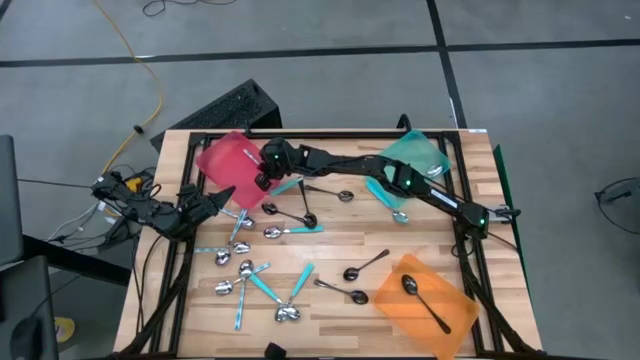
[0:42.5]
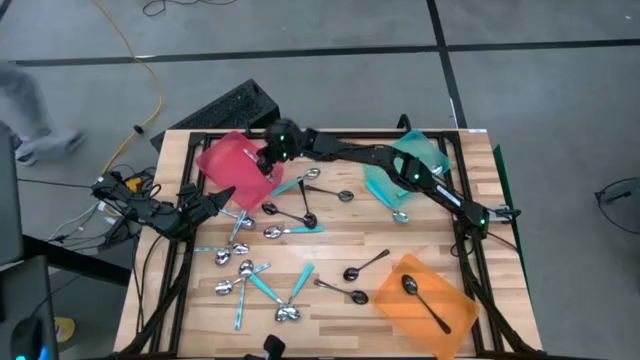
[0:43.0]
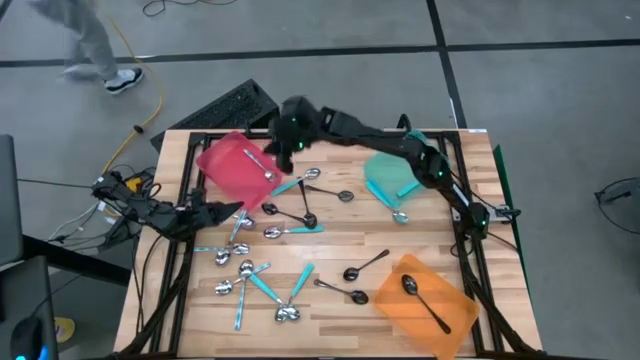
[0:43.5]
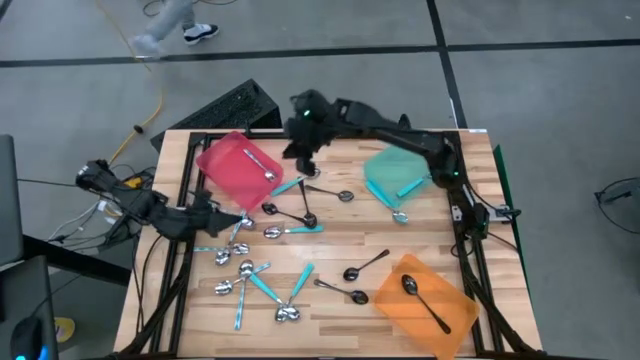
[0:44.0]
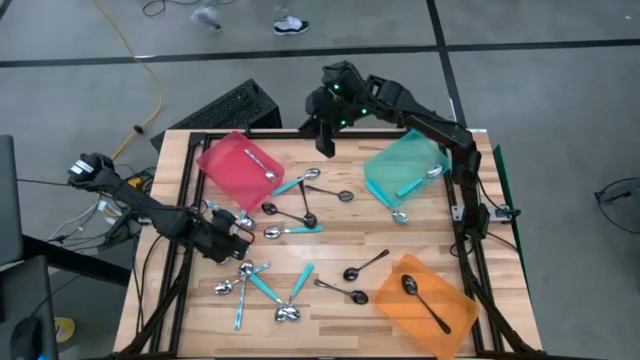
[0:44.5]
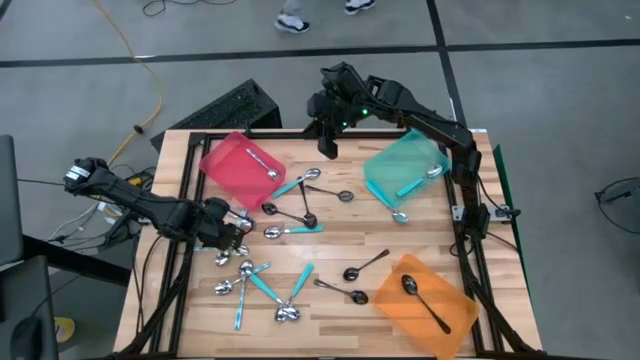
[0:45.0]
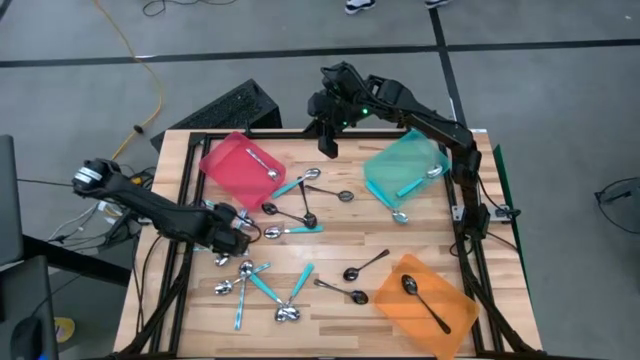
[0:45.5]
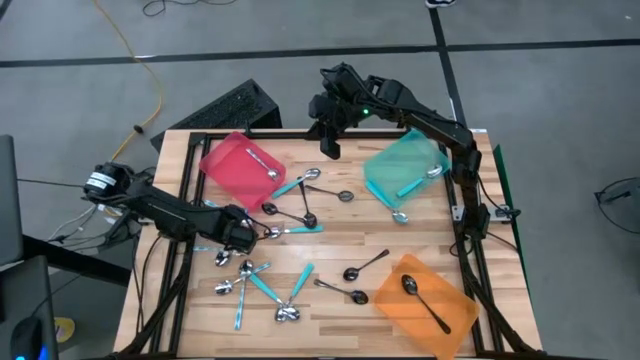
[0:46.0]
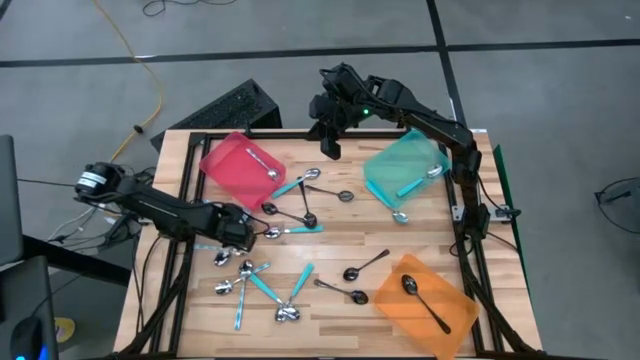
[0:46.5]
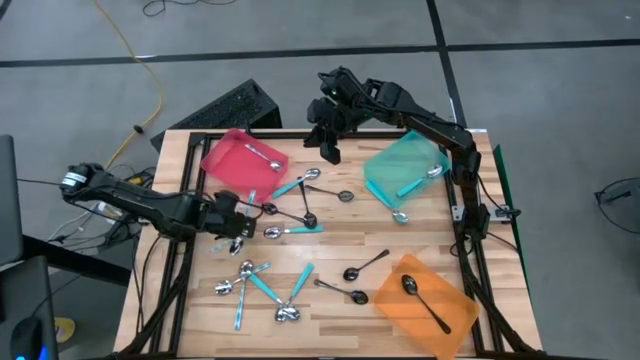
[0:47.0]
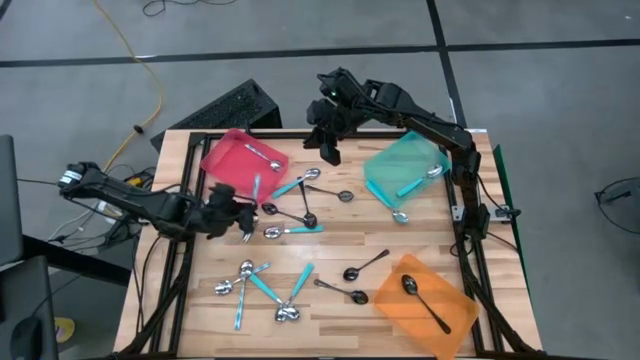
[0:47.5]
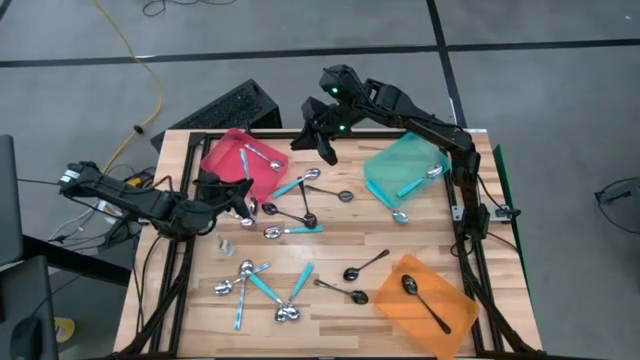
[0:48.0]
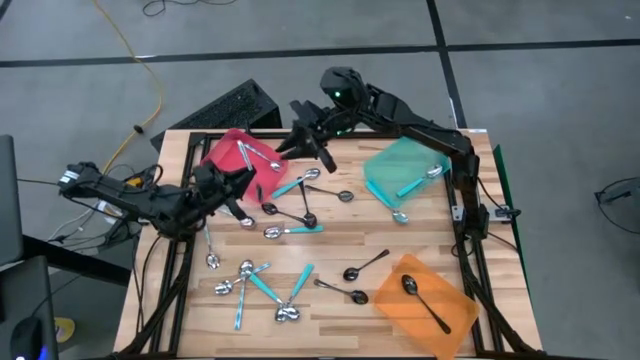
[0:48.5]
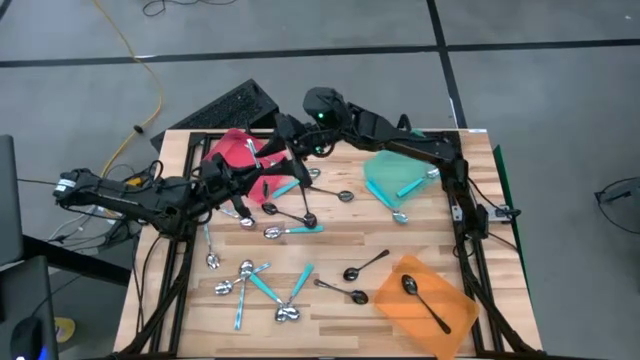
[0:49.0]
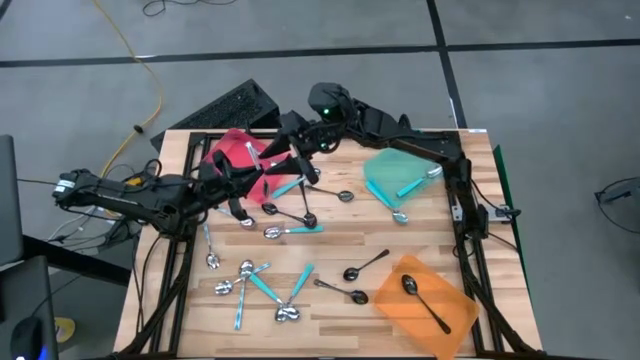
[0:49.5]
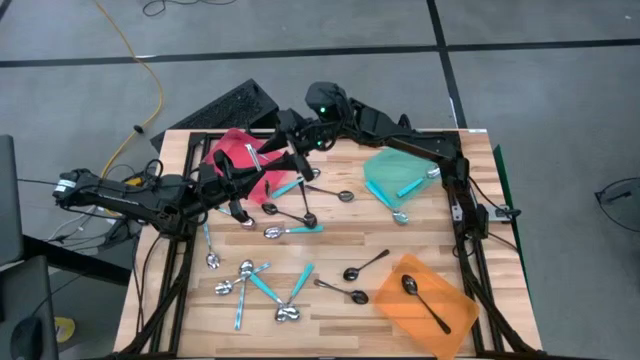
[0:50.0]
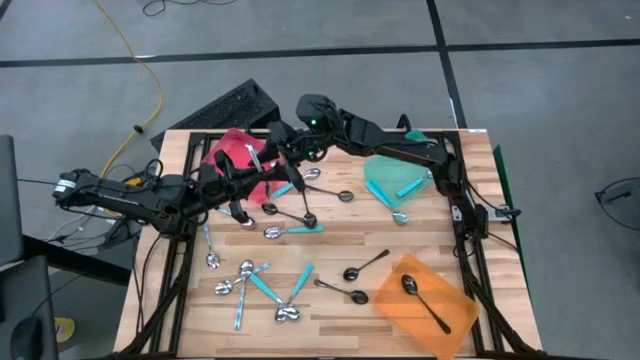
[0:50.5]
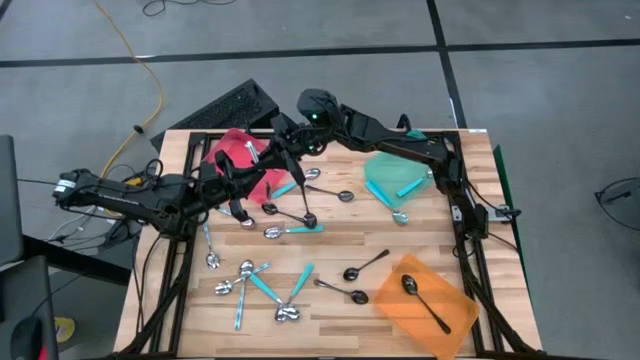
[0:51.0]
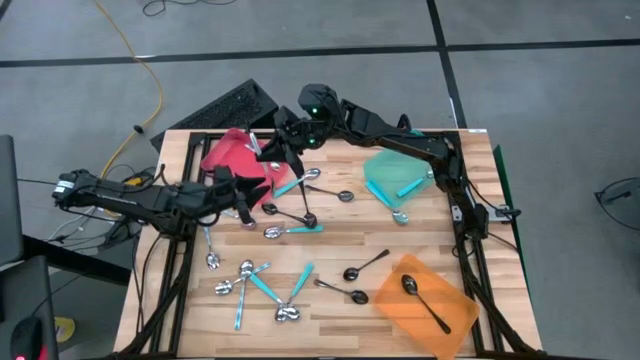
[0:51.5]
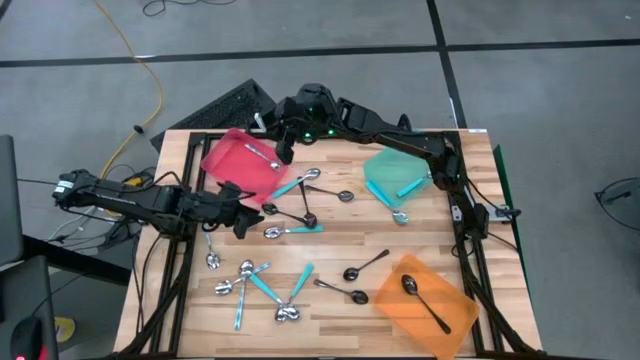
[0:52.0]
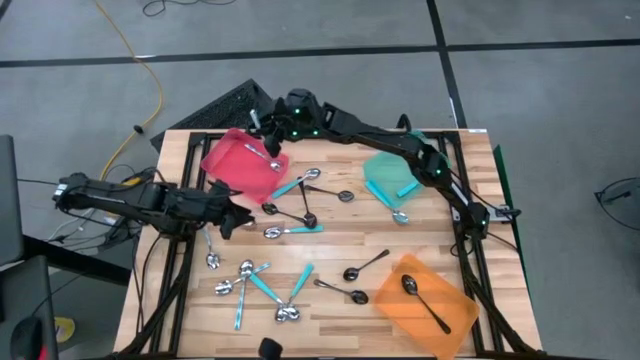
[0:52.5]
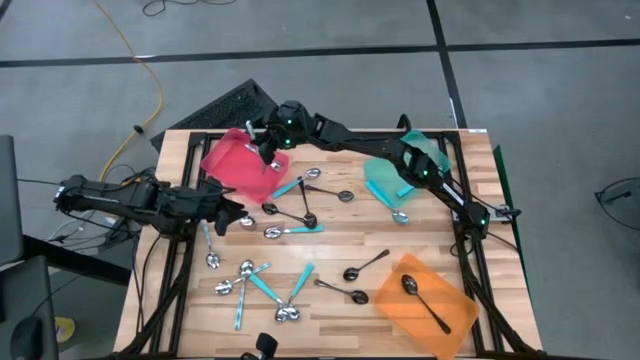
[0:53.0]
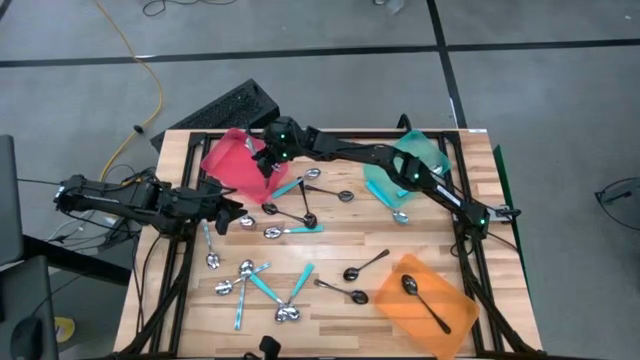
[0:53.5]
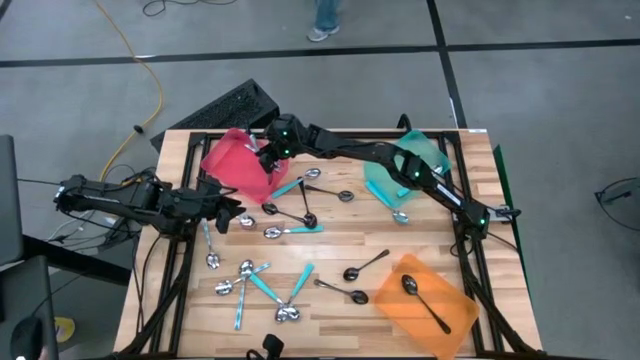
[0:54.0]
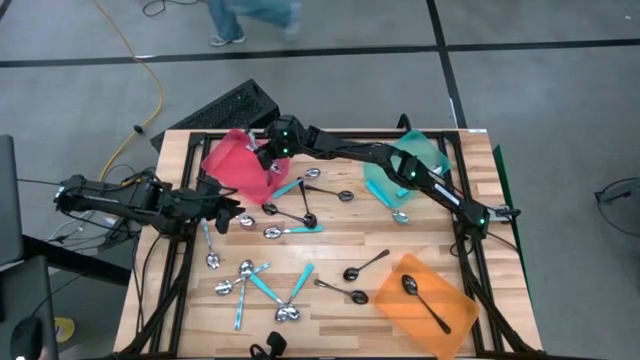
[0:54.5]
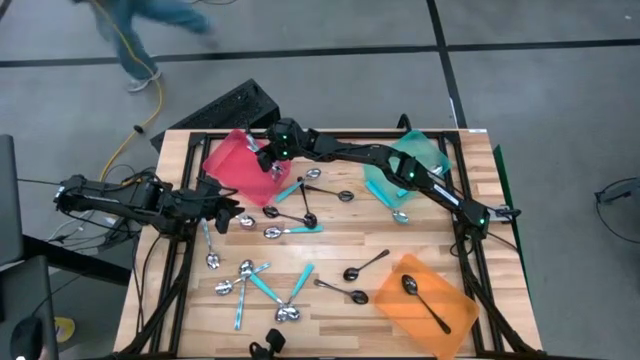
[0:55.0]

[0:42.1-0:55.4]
Task: Sort silverware by color (type)
Put the blue patterned spoon into the red bin

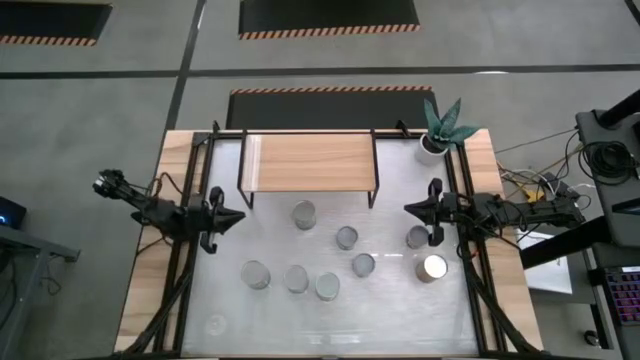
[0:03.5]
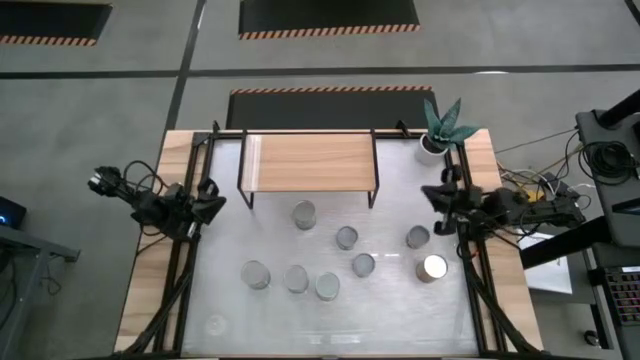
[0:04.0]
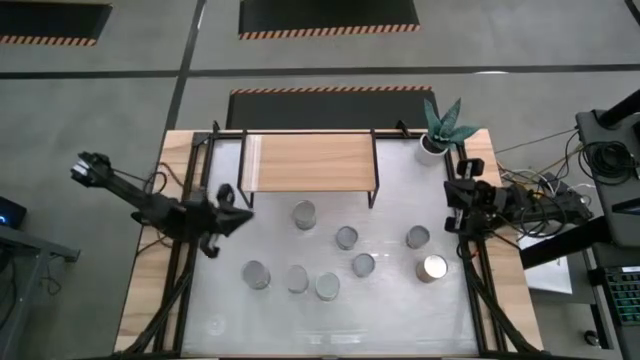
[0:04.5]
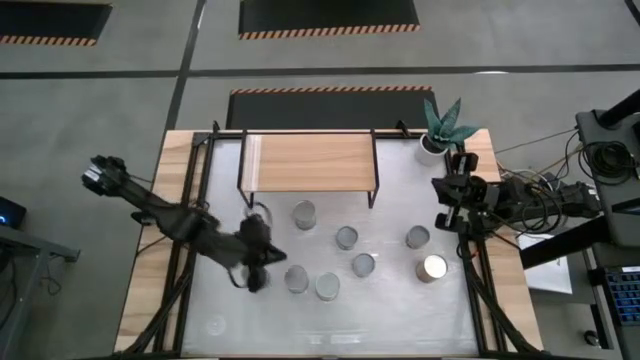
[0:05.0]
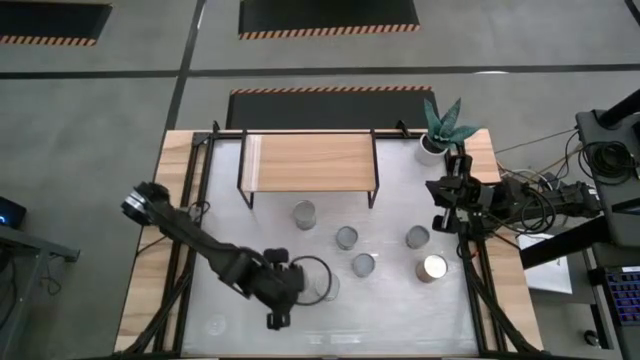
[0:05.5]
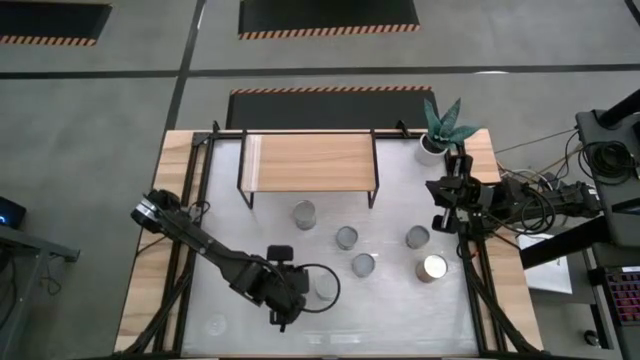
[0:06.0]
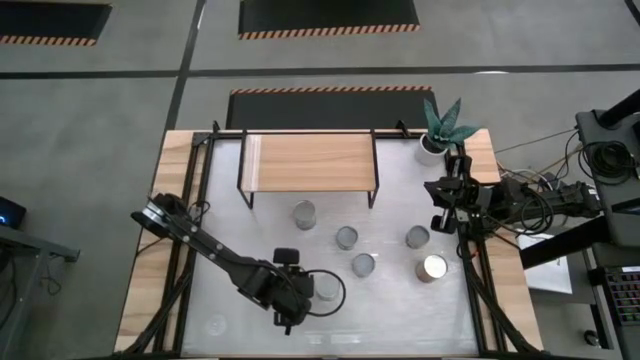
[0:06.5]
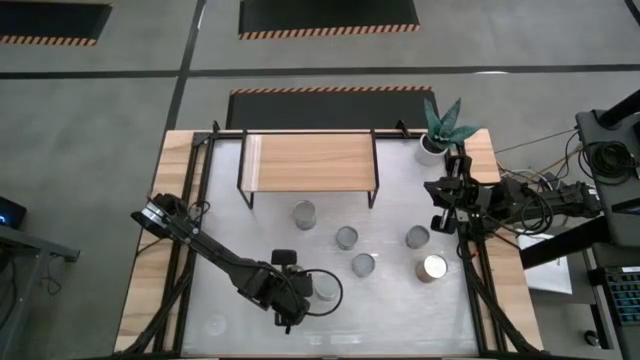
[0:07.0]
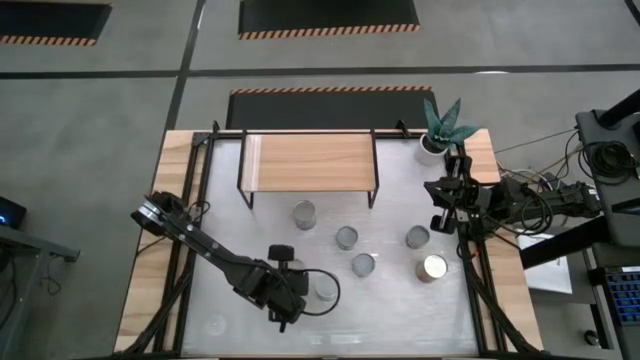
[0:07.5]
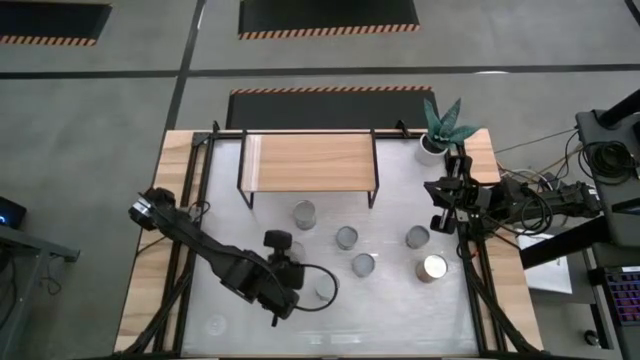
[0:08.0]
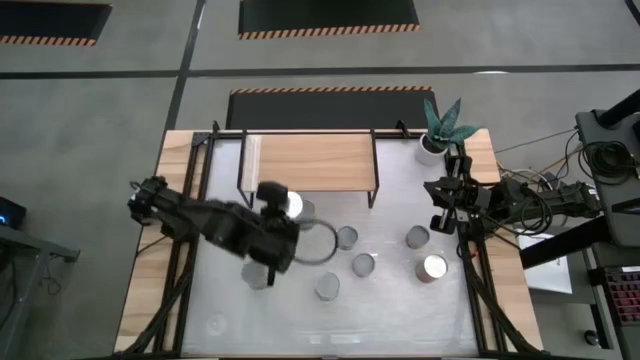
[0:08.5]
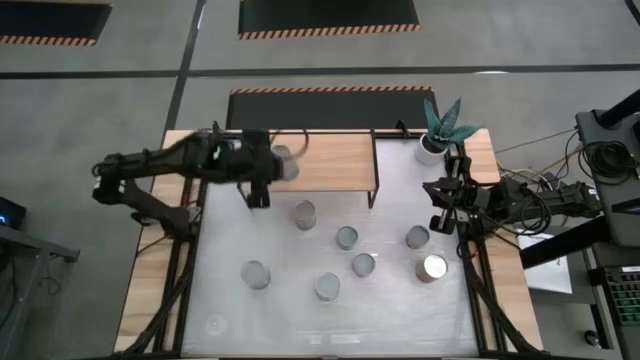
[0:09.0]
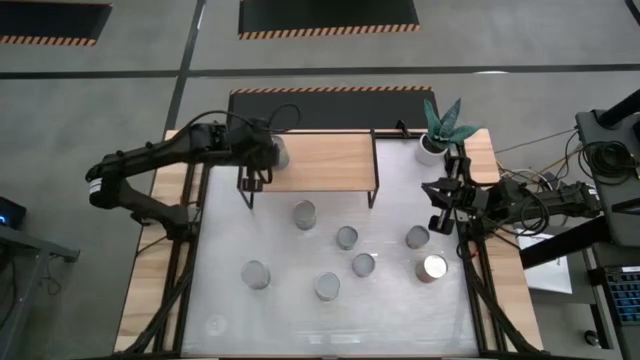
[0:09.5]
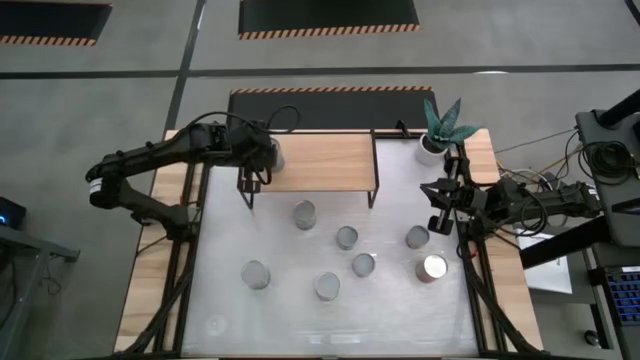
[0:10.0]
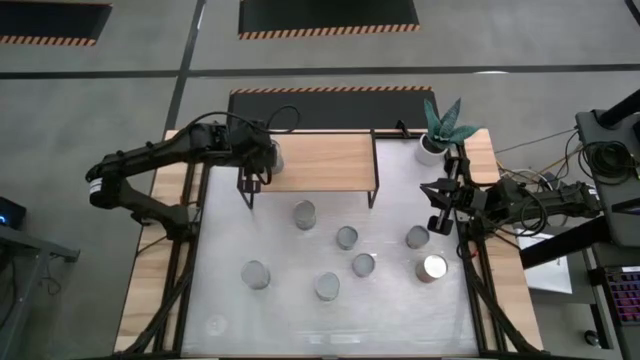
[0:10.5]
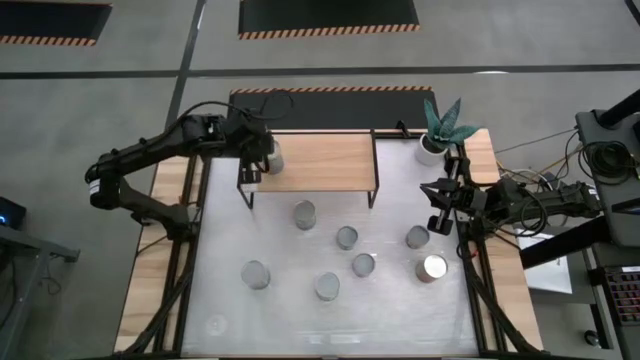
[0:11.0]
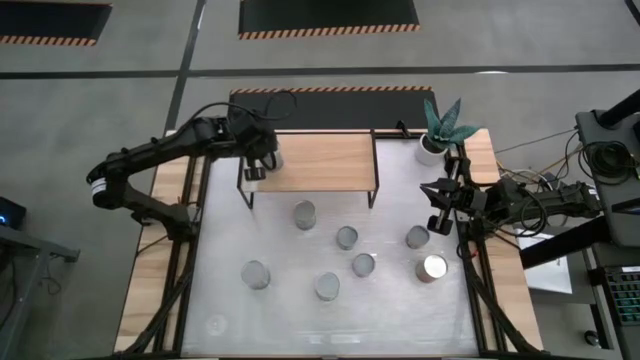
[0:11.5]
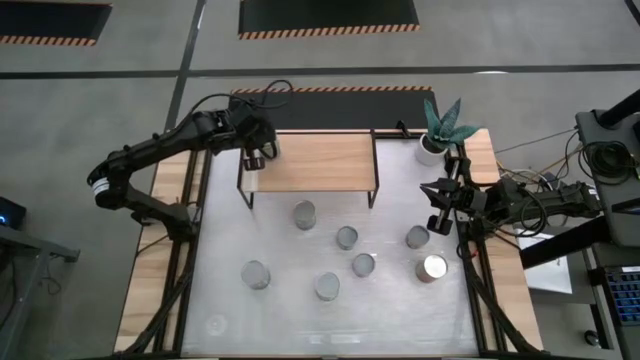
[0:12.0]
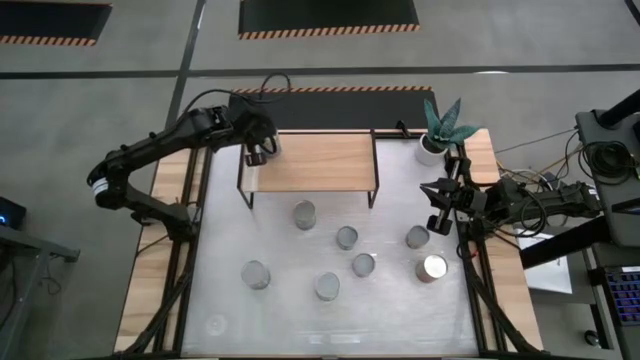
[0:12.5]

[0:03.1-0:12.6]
Task: Pick and place cans onto a shelf
Put the canned cherries on the shelf
